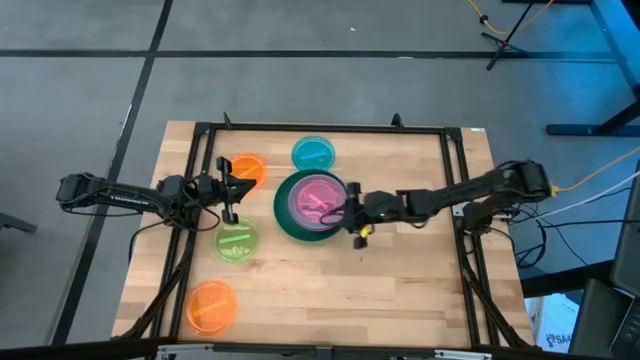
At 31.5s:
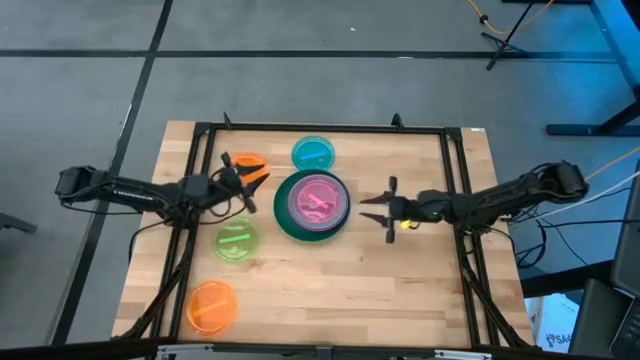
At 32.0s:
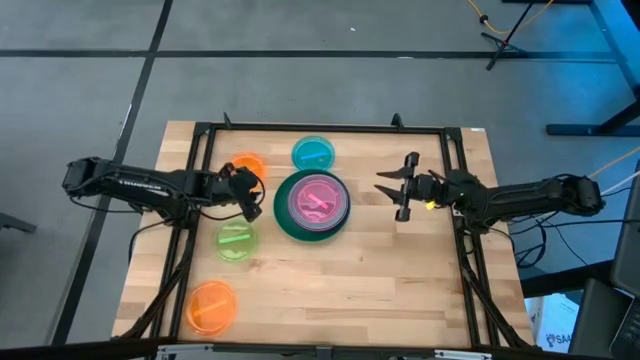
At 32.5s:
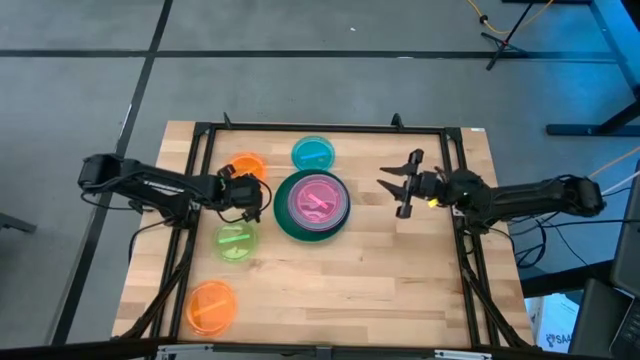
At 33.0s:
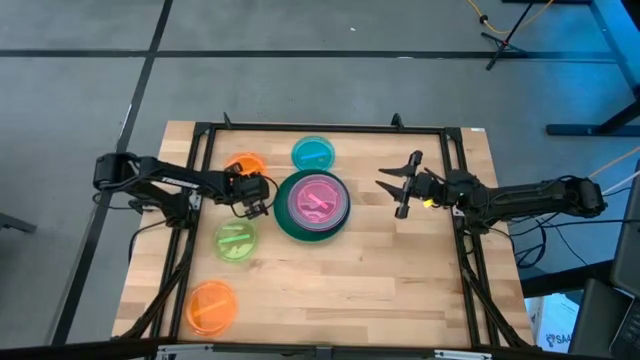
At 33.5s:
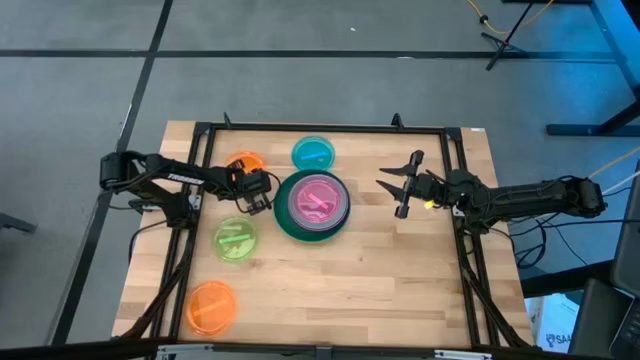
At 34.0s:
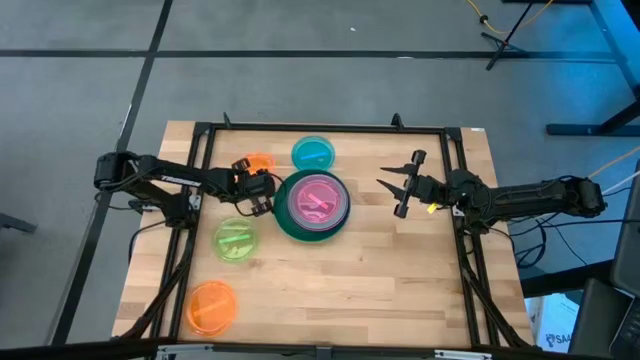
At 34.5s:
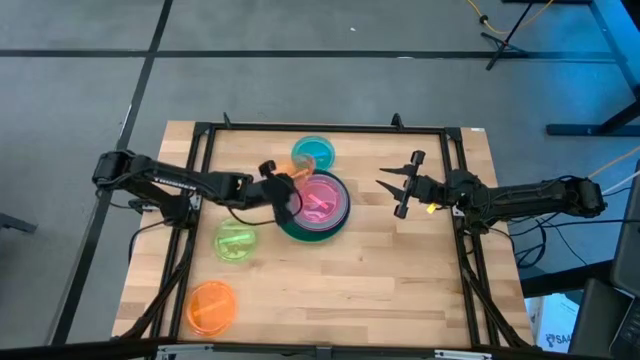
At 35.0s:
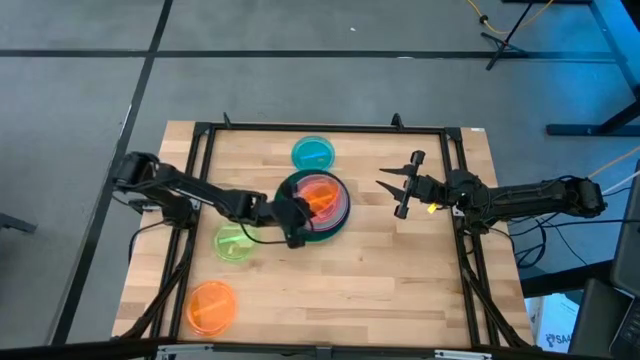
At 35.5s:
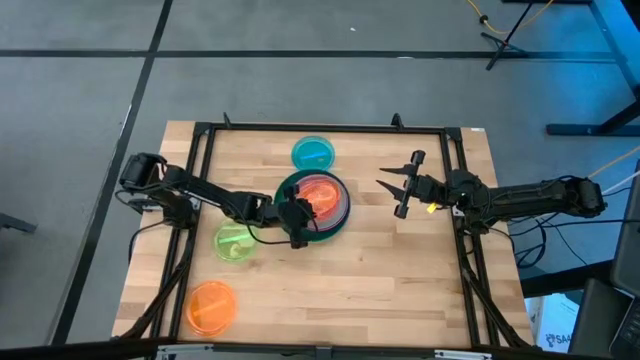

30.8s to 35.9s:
Task: Stack plastic plates
Stack the top orange plate on top of the light pink plate

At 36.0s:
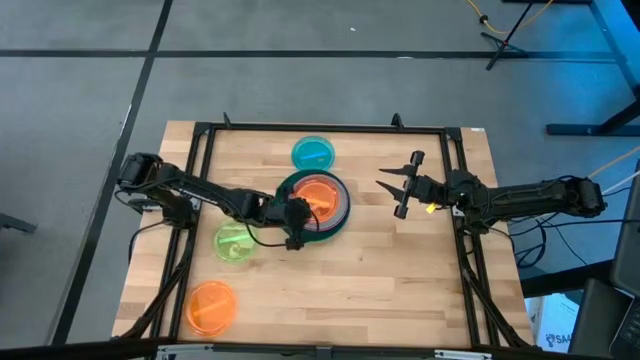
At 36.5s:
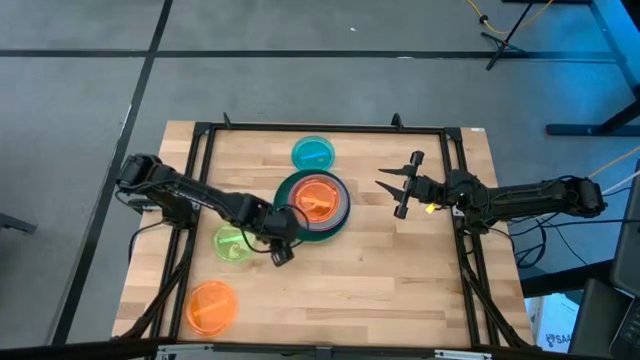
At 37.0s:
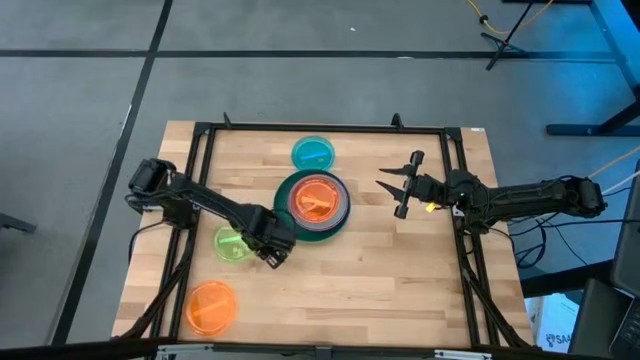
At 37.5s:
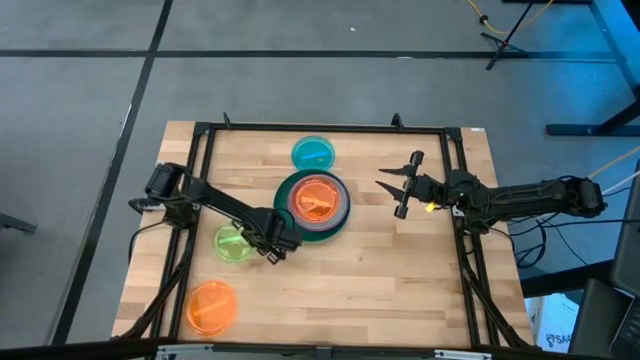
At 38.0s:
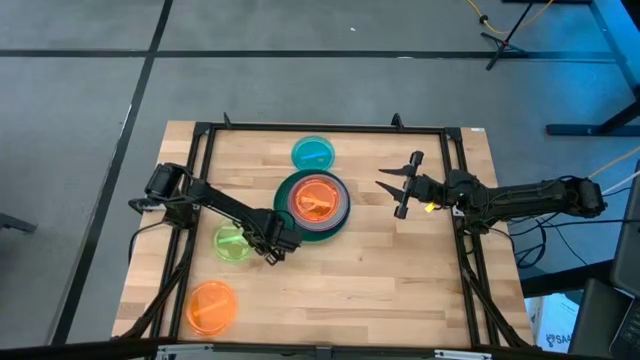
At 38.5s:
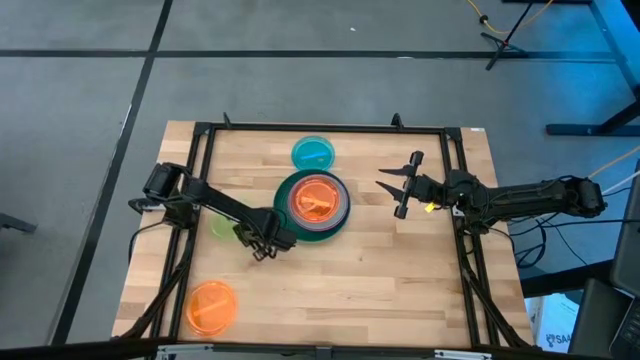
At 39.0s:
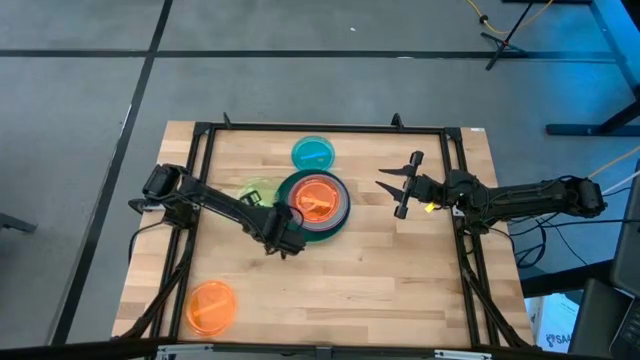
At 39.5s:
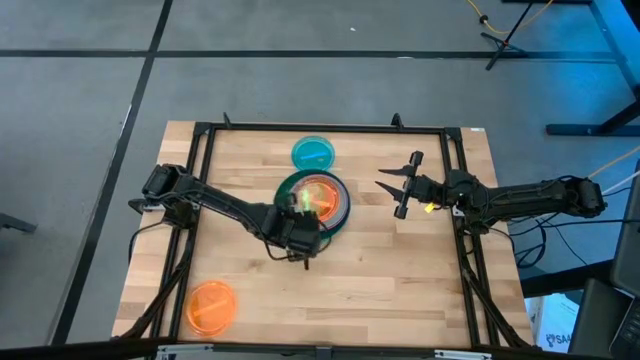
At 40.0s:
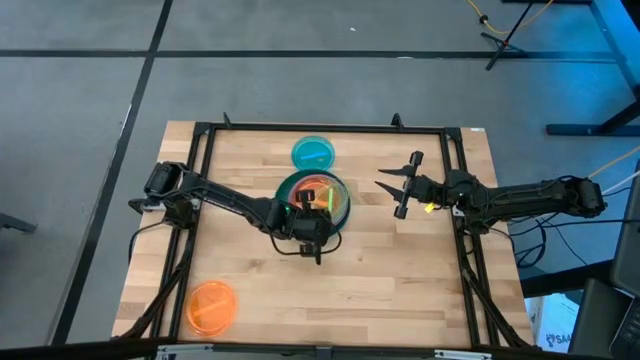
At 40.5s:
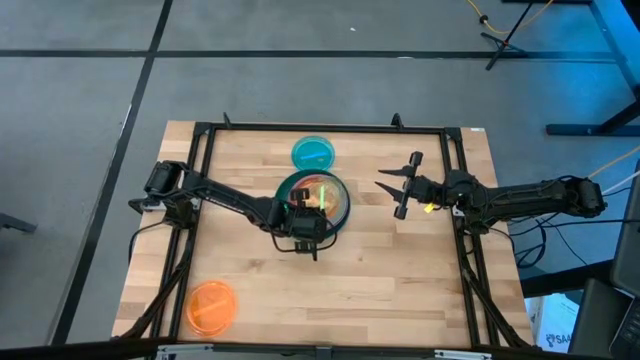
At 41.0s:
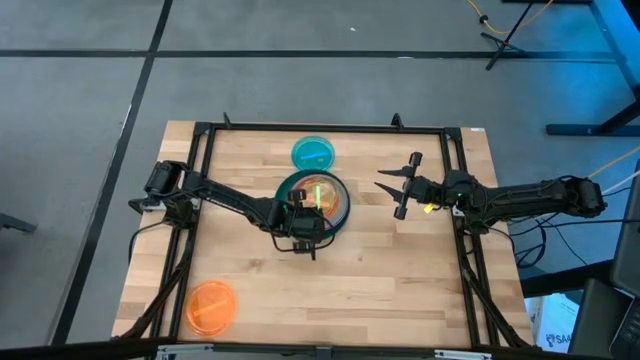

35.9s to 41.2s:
Stack the light green plate on top of the top orange plate

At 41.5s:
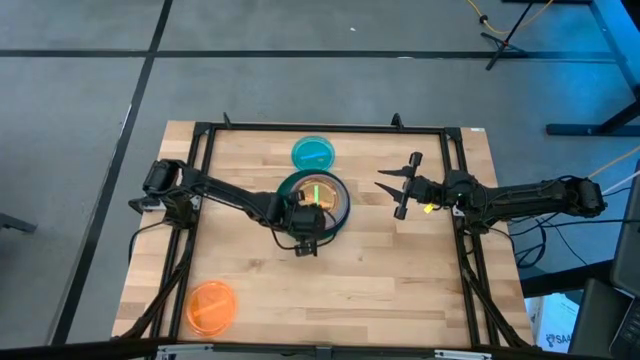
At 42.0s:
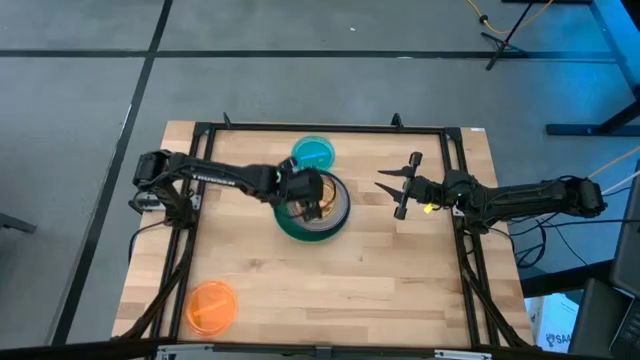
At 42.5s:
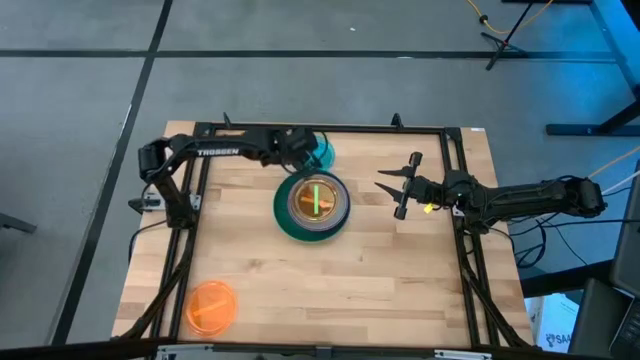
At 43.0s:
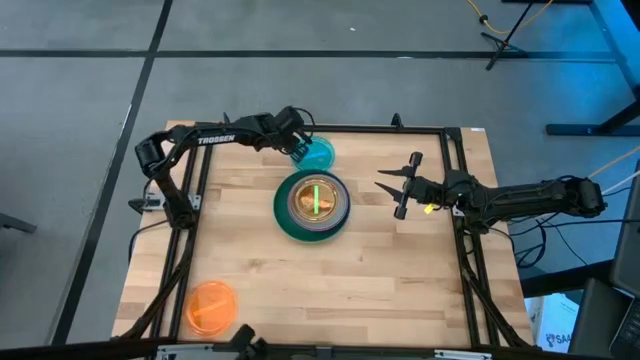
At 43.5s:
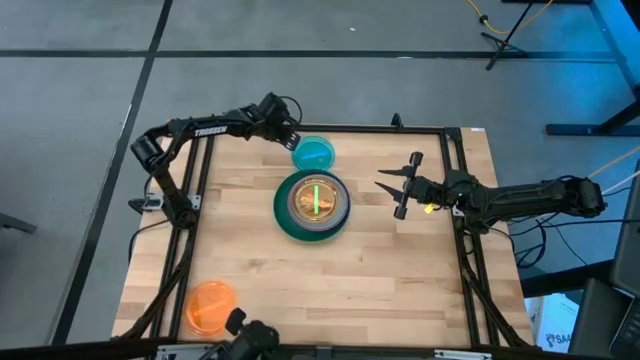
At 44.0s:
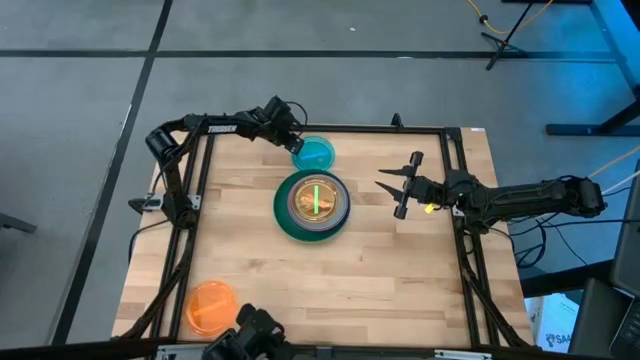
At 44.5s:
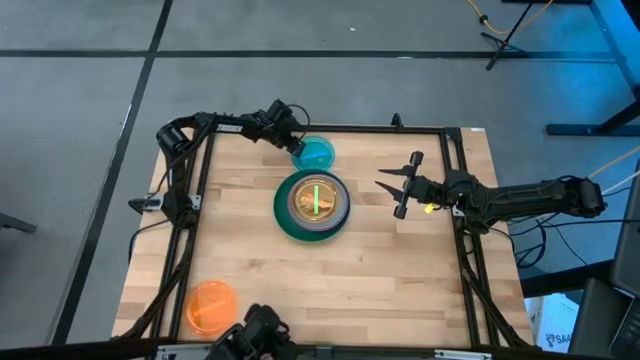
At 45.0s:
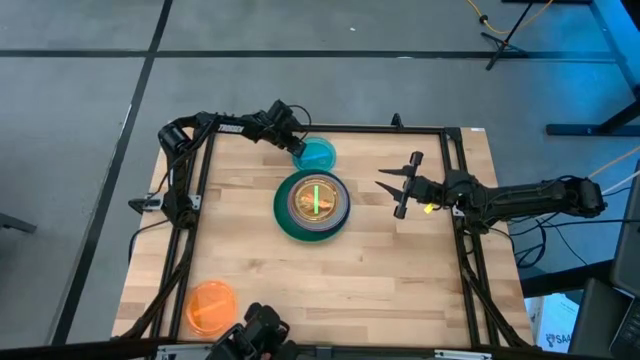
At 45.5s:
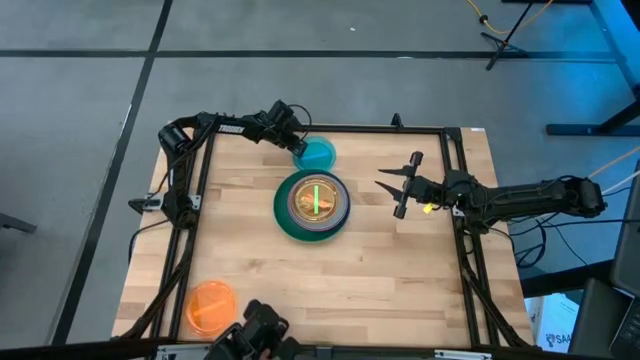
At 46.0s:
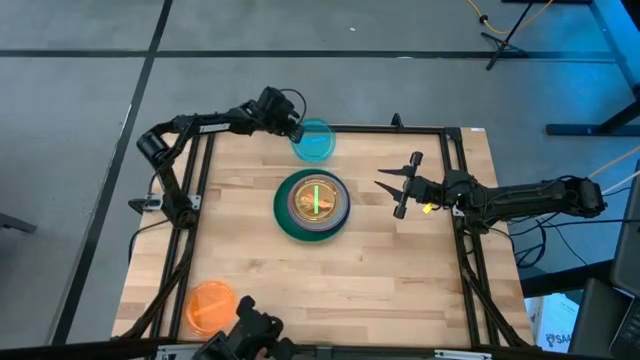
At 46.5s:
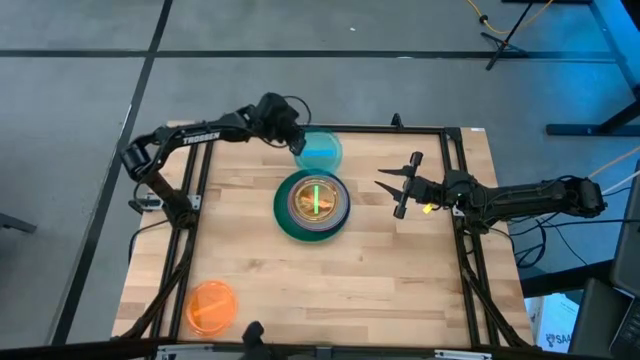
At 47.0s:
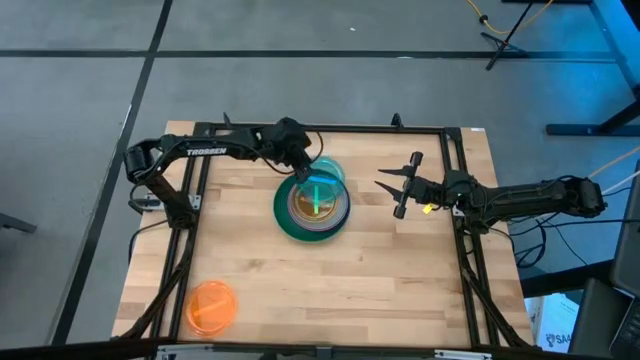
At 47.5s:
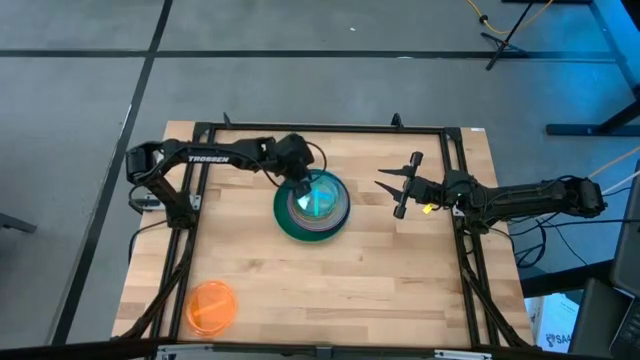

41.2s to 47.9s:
Stack the light blue plate on top of the light green plate

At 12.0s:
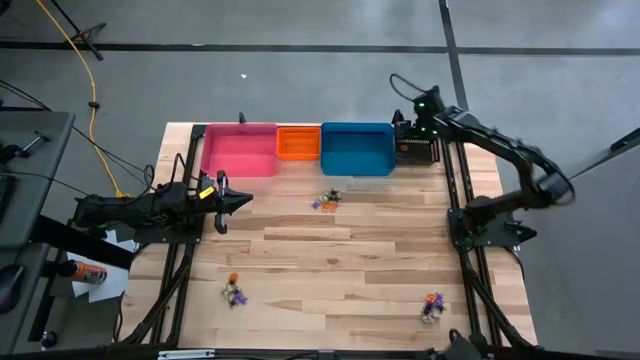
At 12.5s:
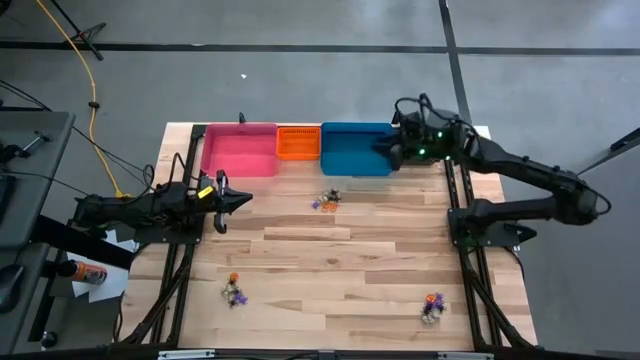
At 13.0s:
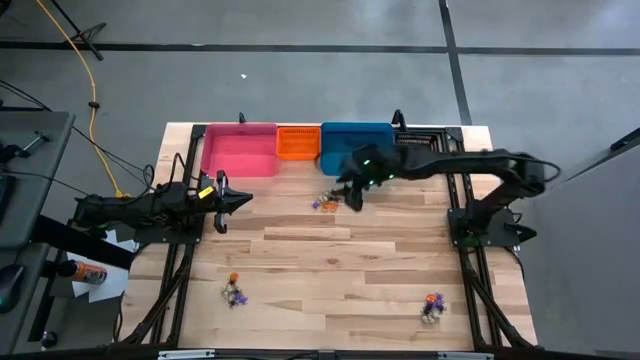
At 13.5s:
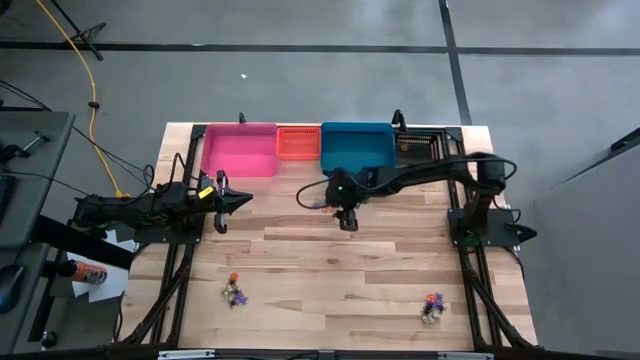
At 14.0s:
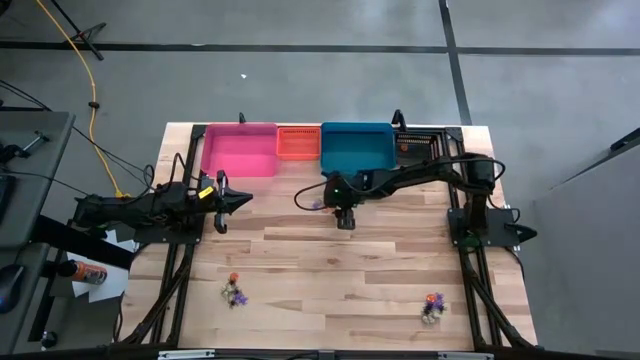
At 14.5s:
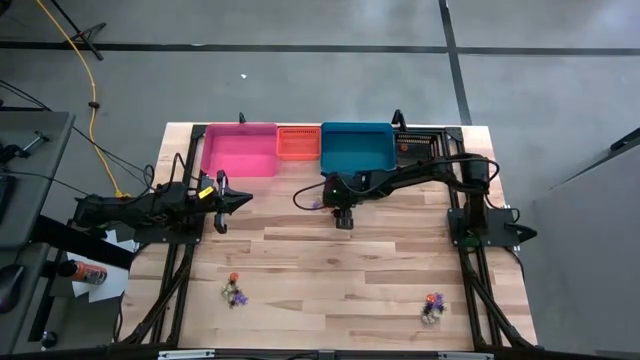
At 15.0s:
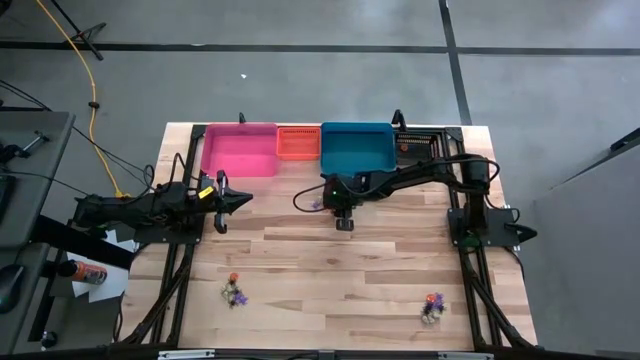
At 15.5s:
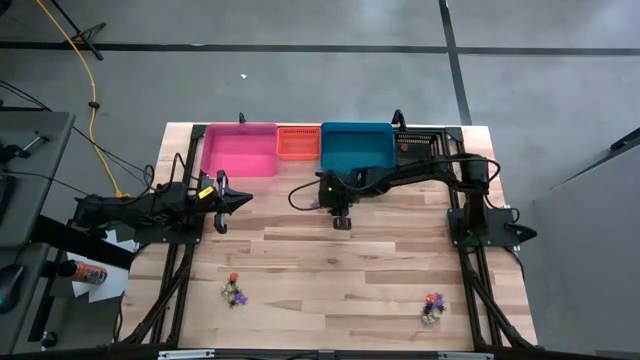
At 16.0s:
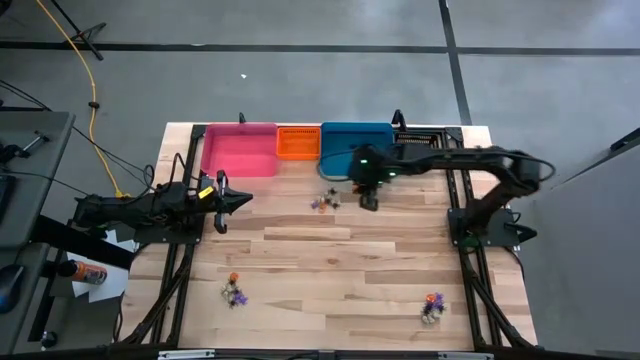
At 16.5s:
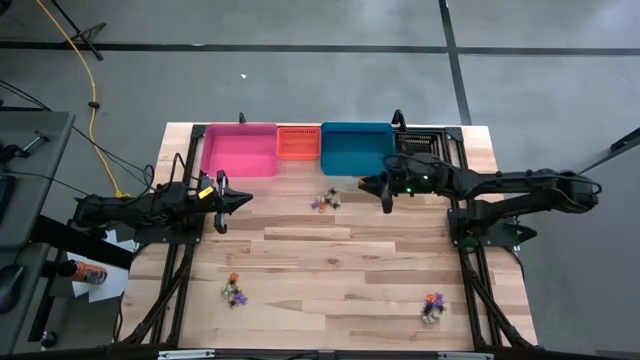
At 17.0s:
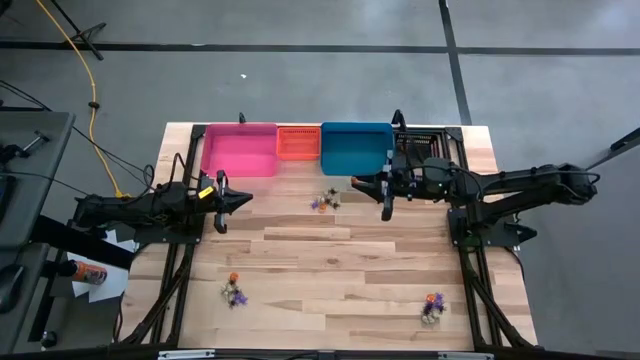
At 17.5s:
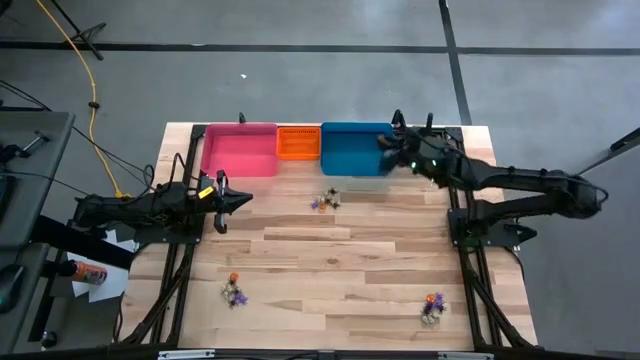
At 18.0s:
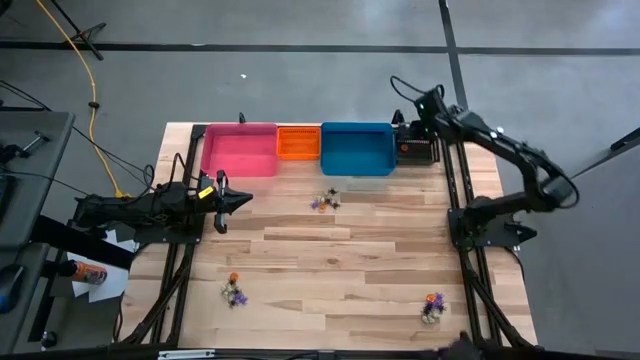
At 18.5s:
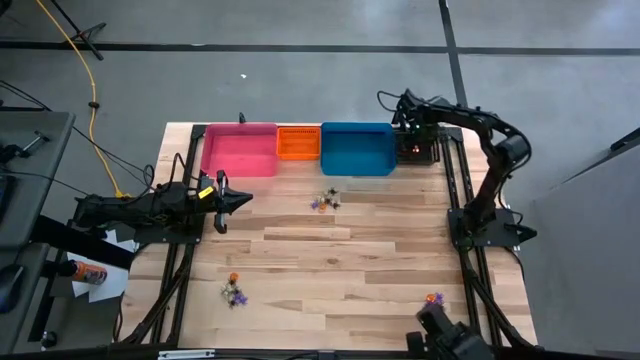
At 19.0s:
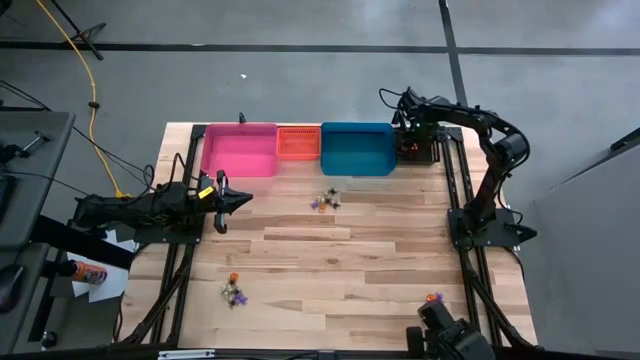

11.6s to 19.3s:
Task: Sort Halloween decoration
Put the orange pumpkin toy into the black bin
